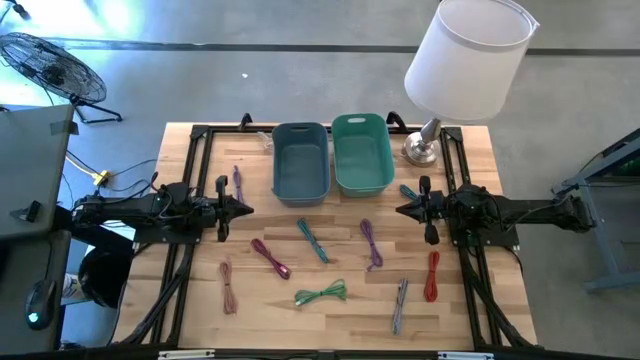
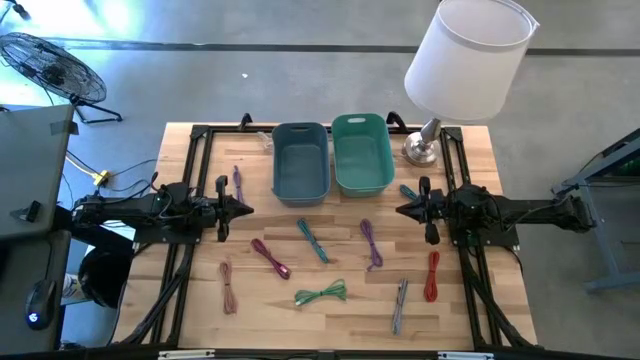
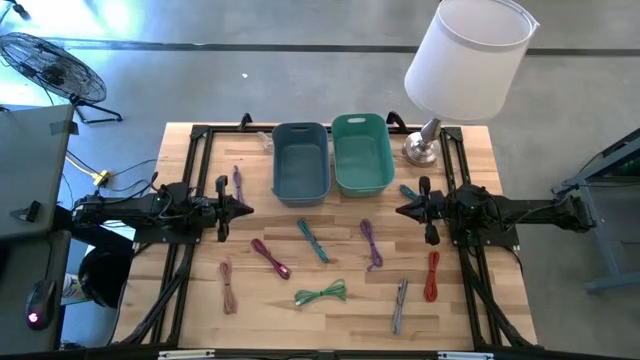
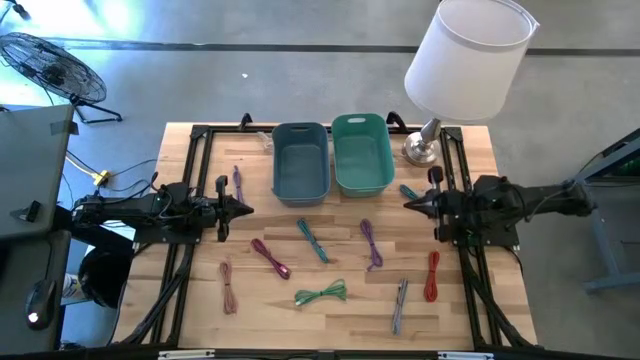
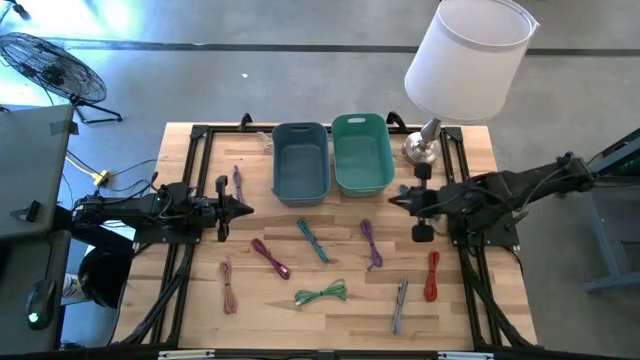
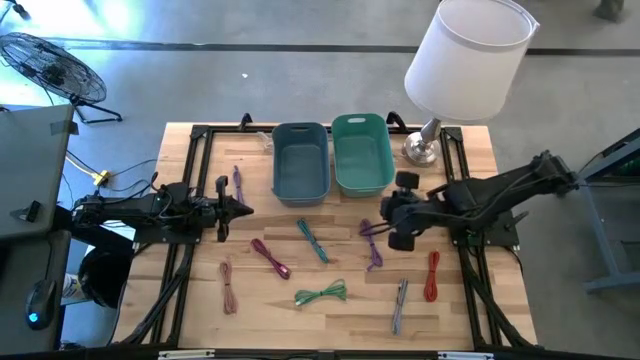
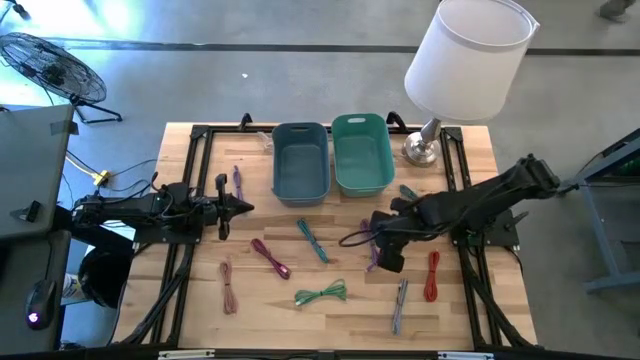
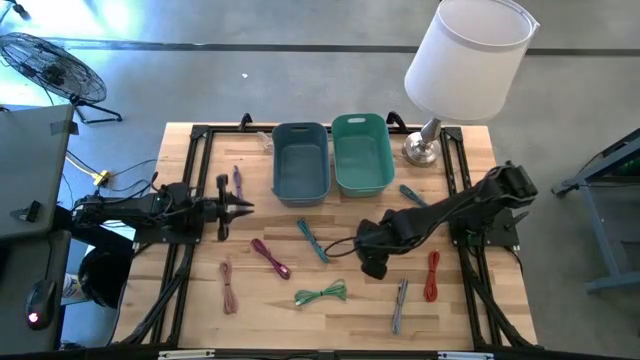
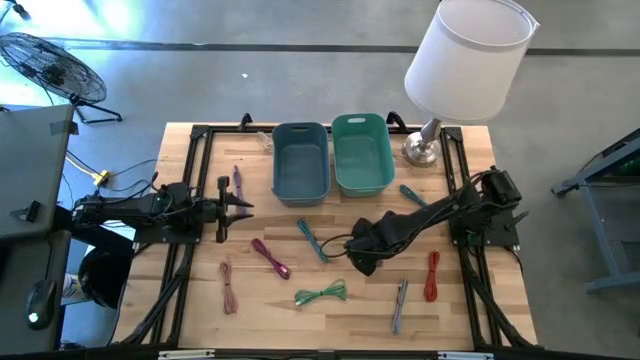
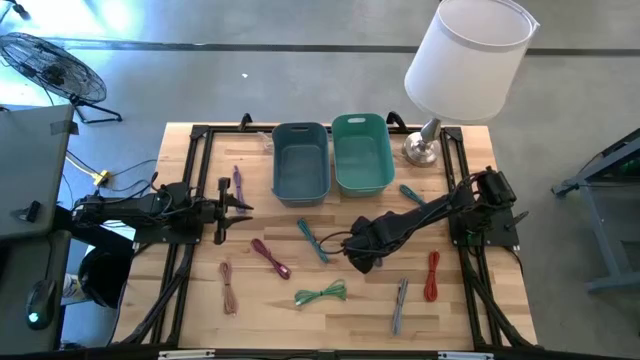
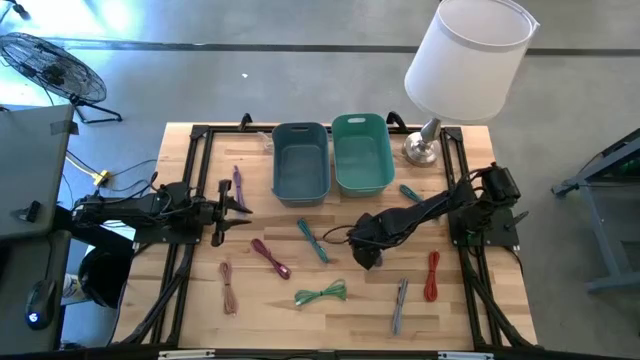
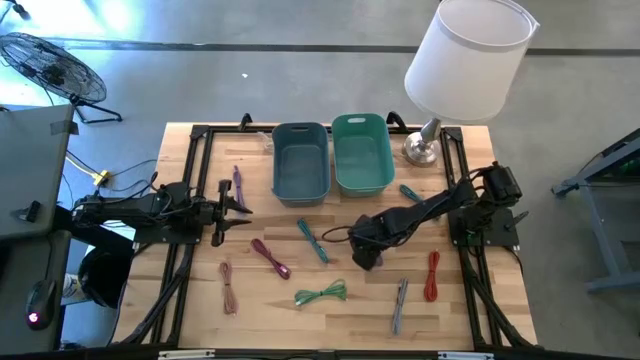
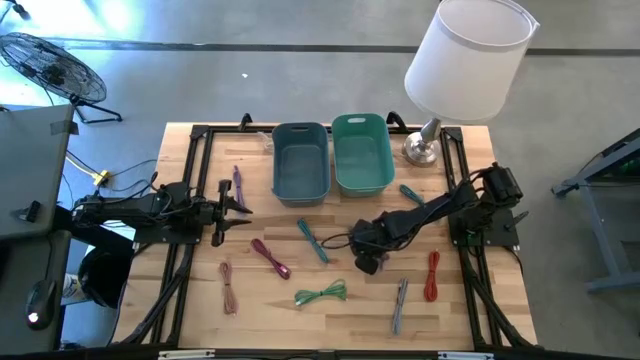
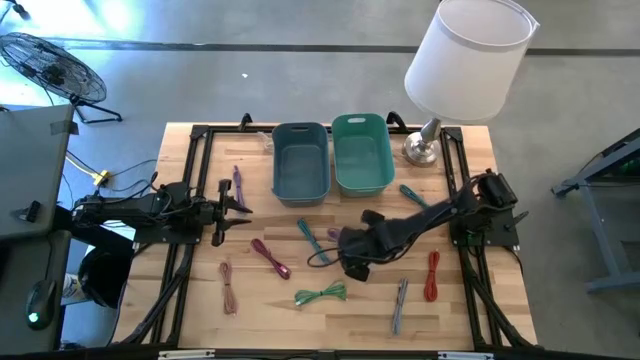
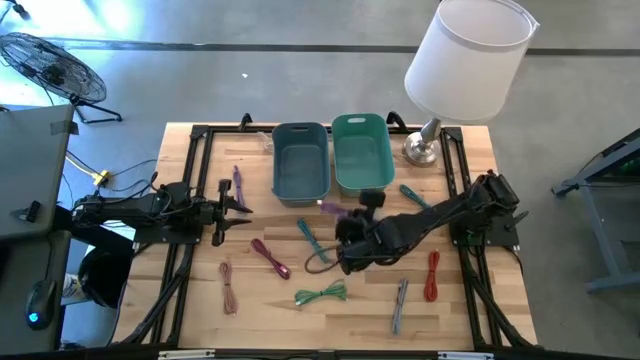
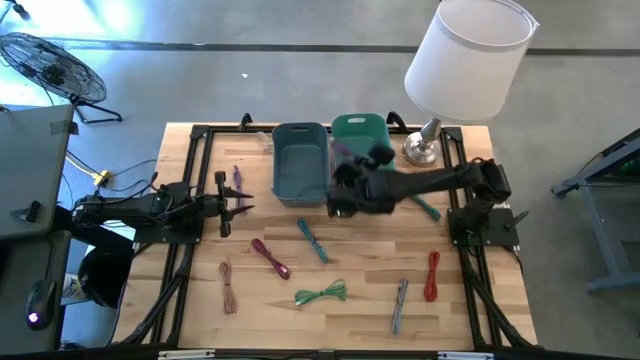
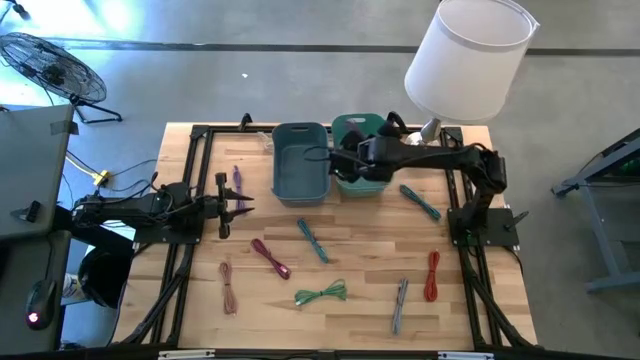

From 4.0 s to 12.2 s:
Task: Pick & Place USB Port
Put the bottom violet charger cable into the green bin

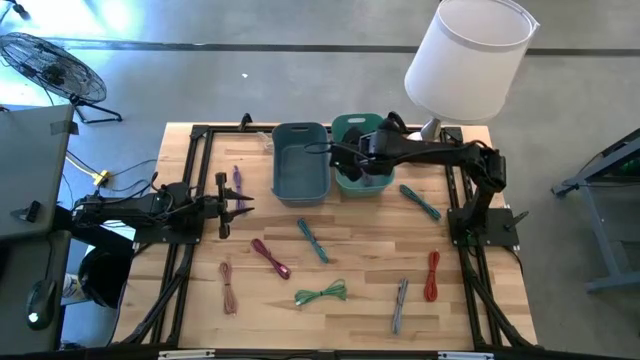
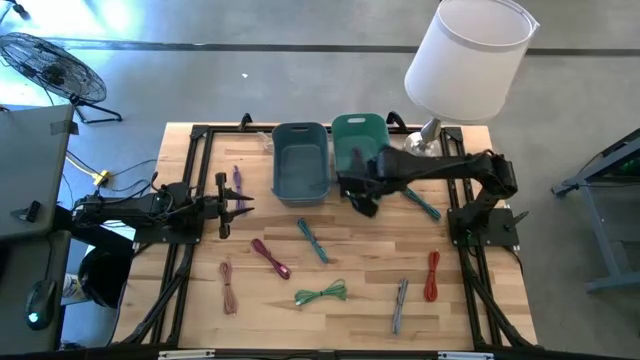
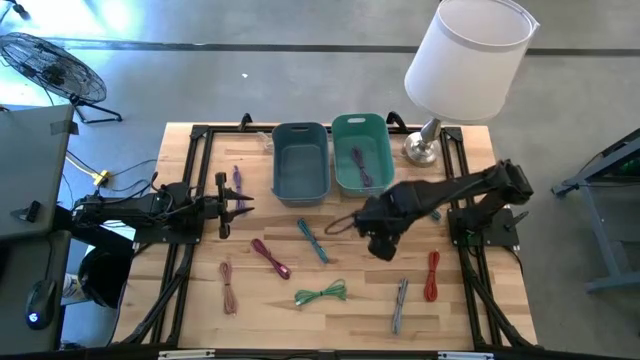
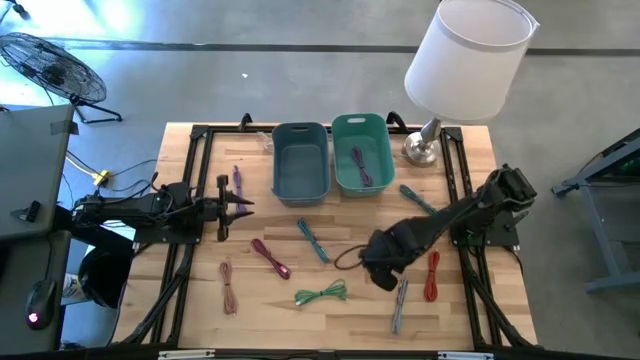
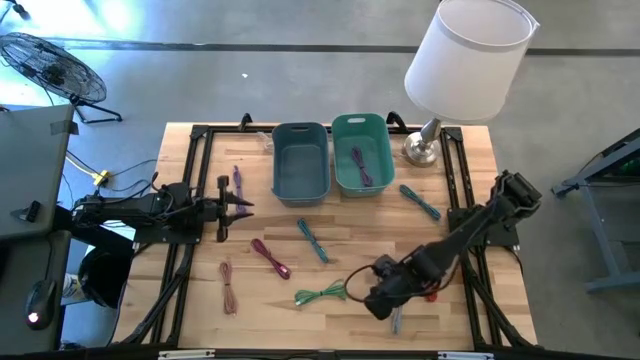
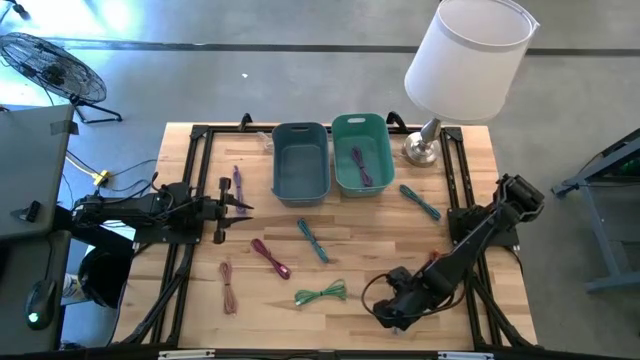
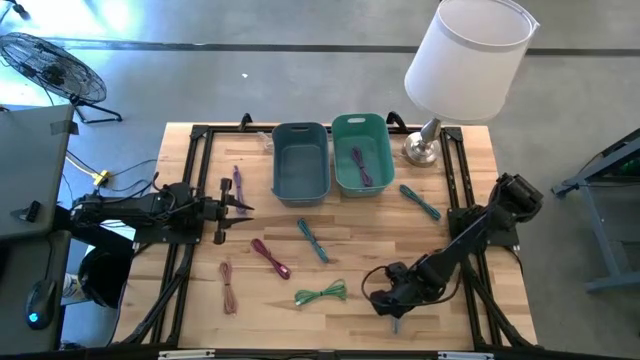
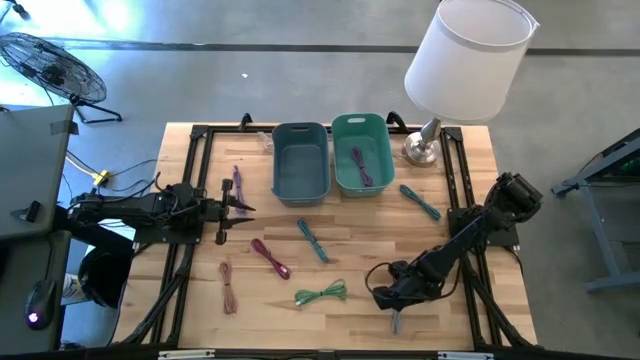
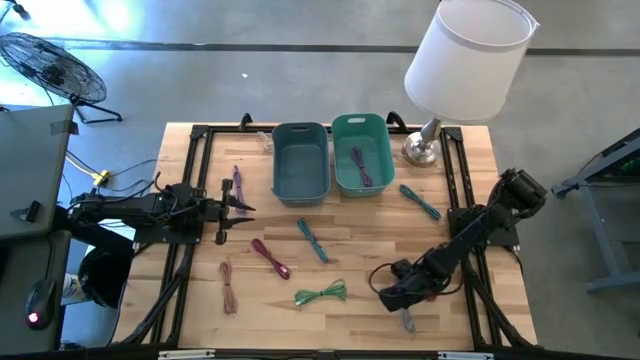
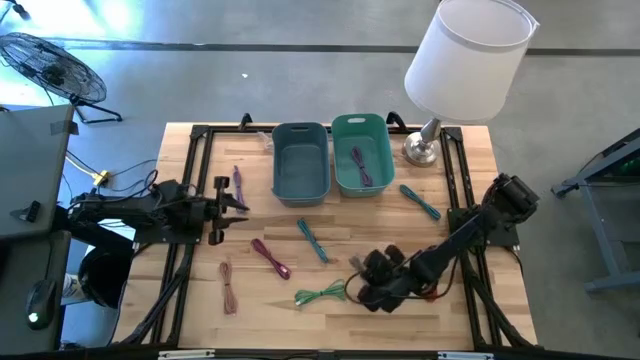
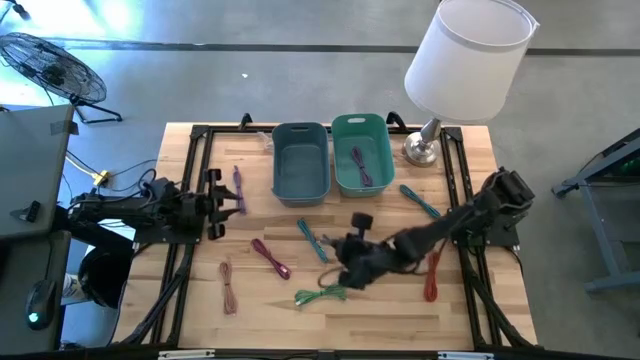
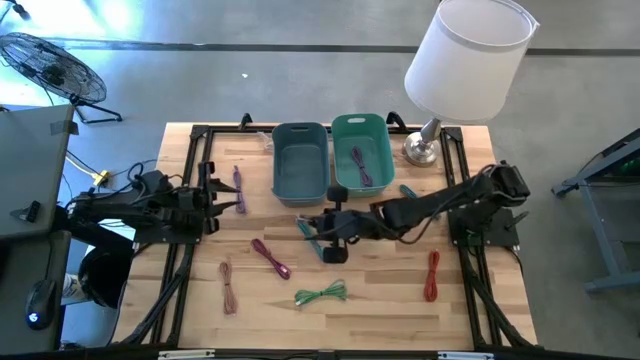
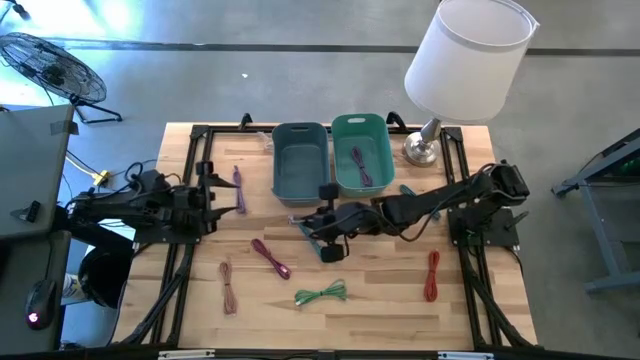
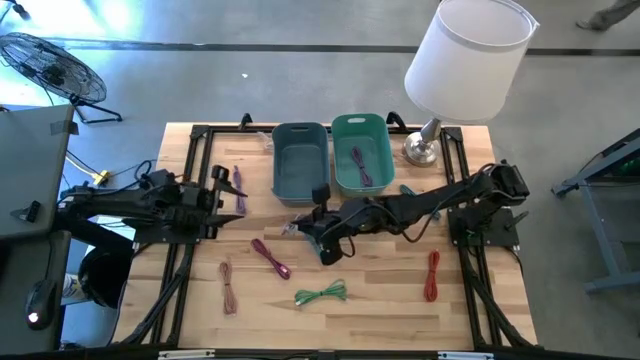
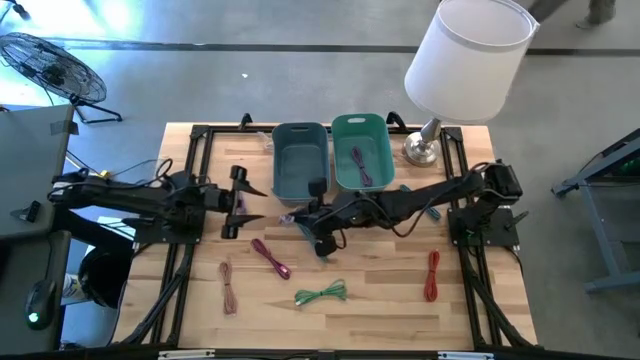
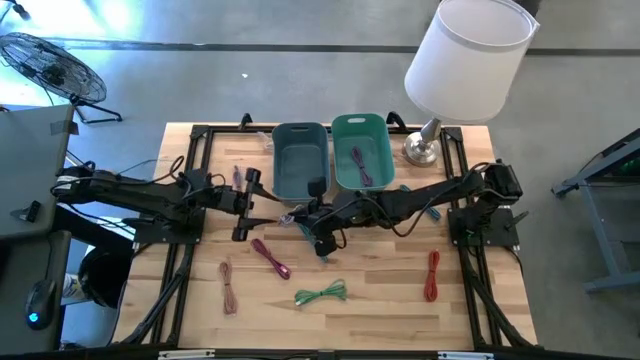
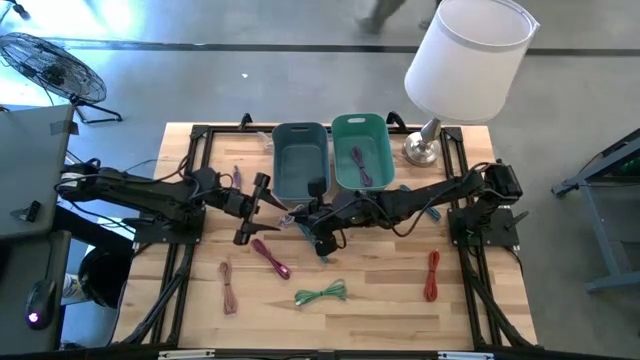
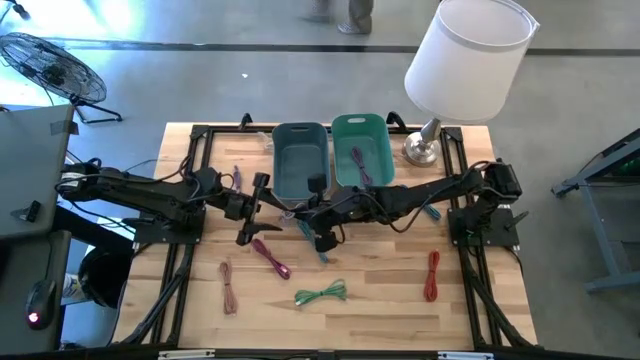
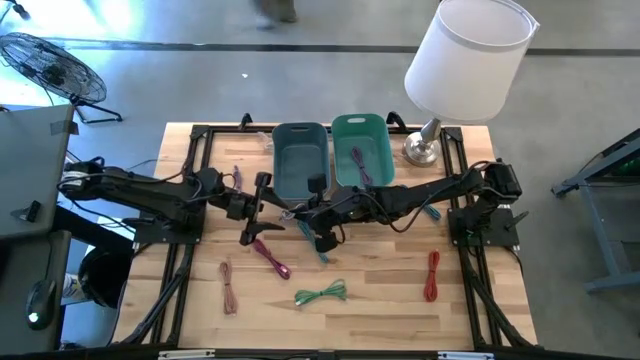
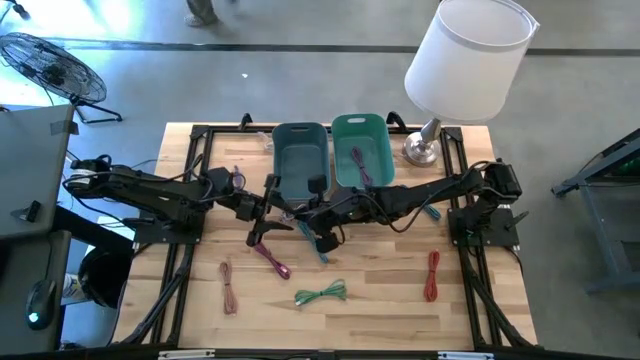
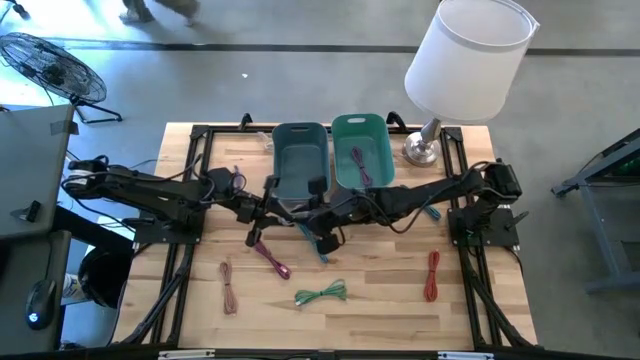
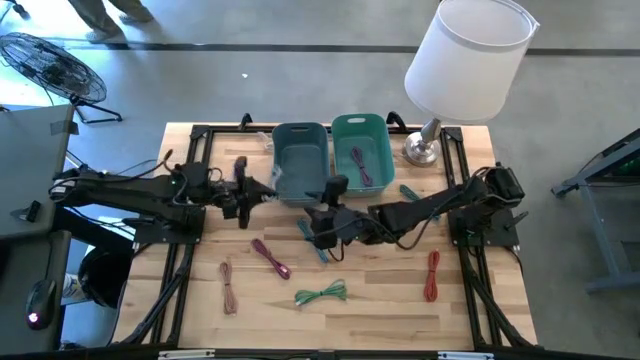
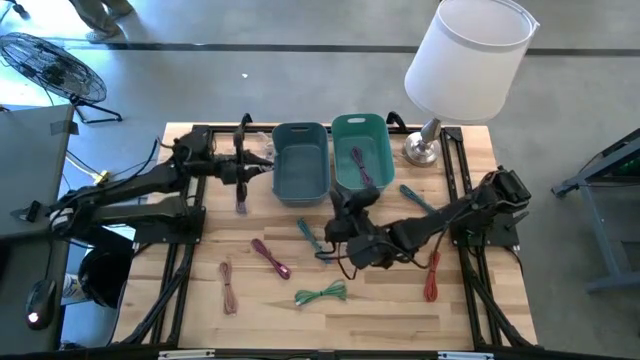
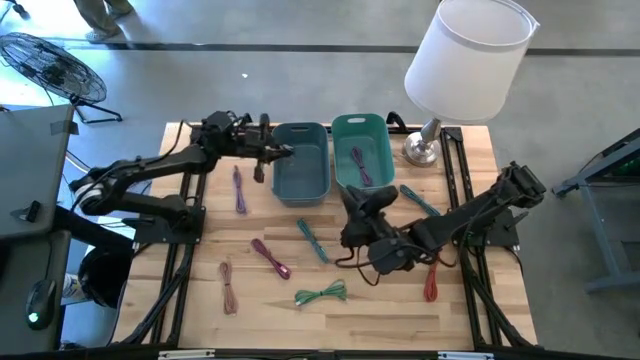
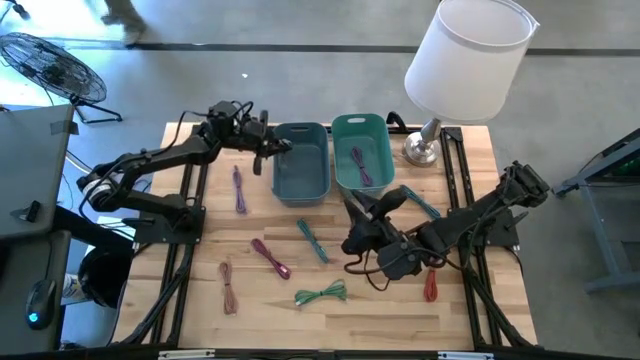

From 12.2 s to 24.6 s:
Put the black and white charger cable into the blue bin

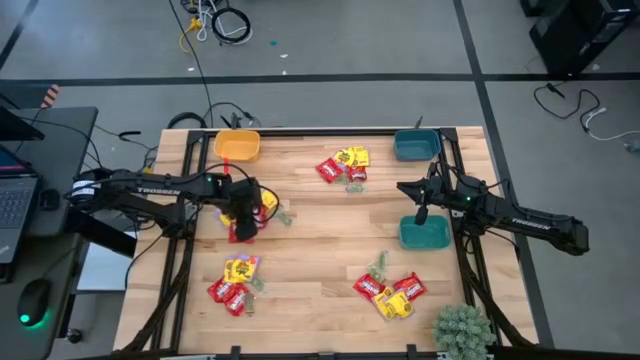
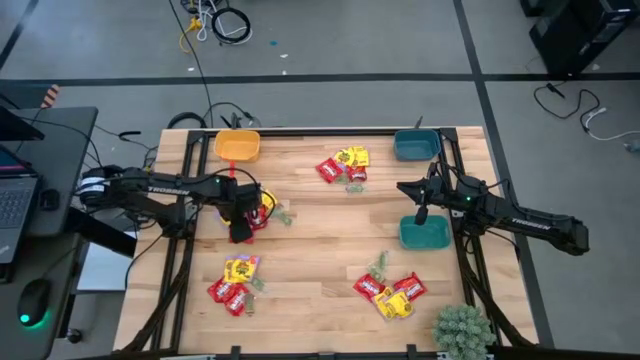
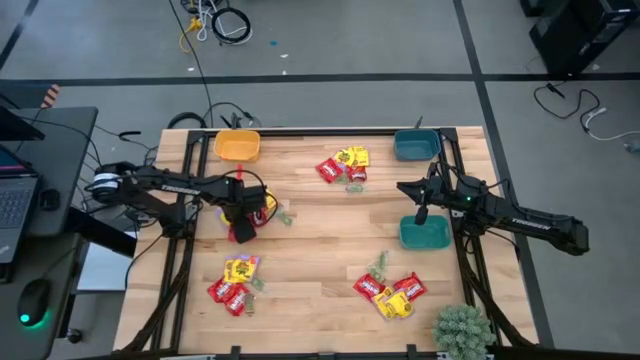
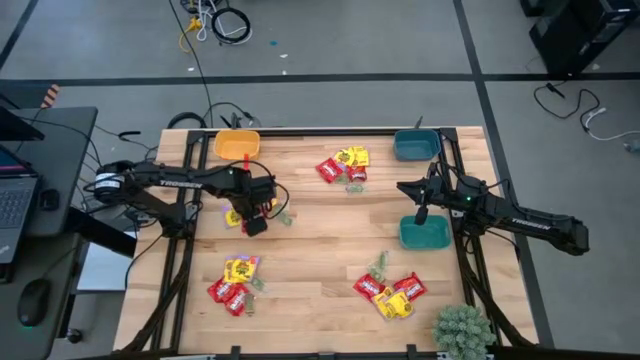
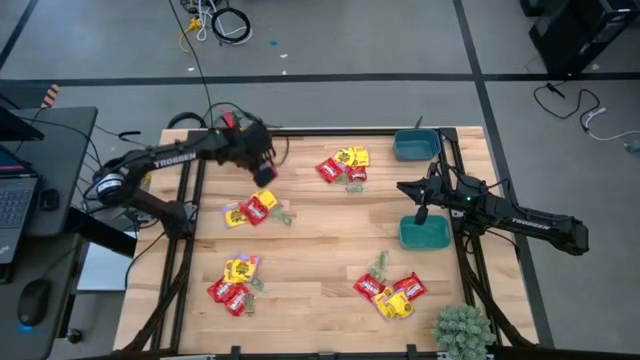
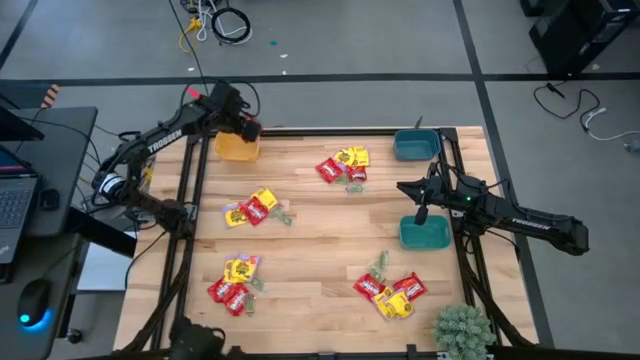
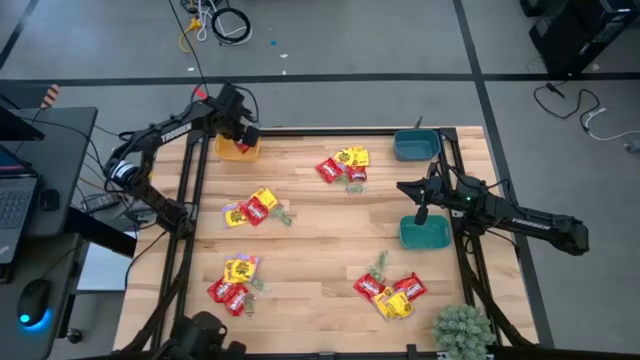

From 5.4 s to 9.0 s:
Task: Sort candy
Put the red candy into the yellow bin
